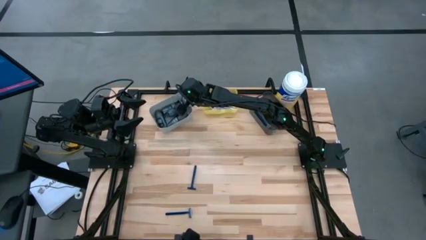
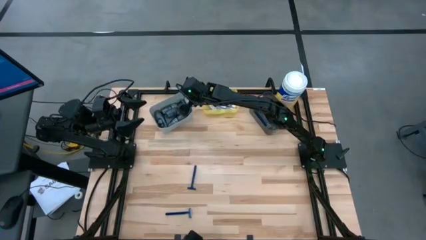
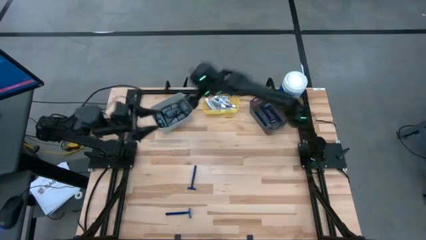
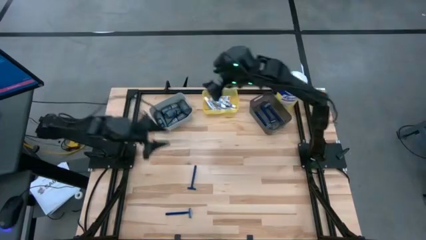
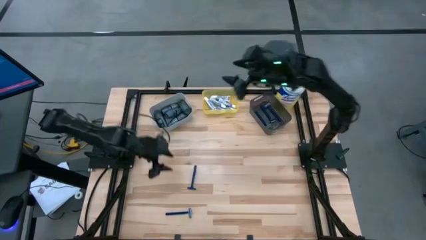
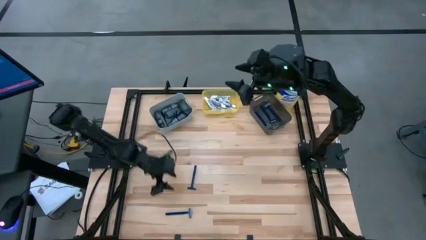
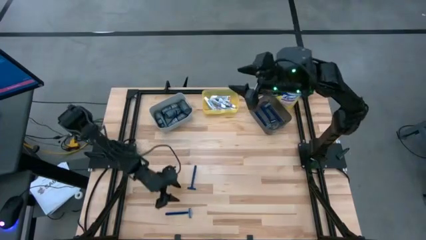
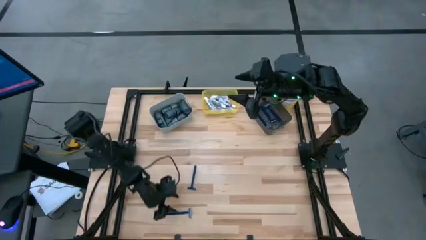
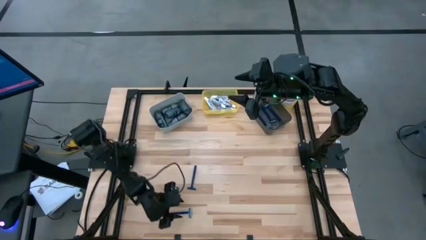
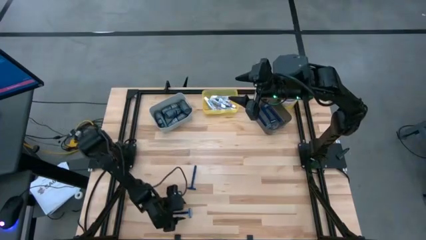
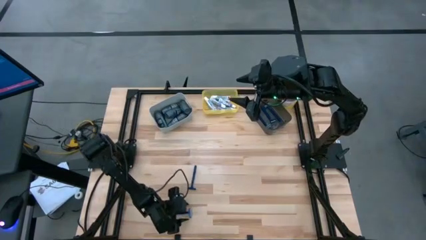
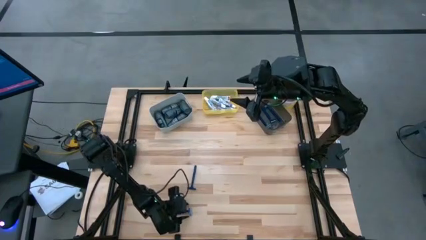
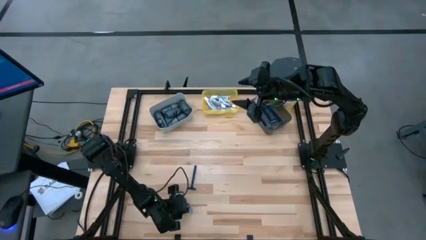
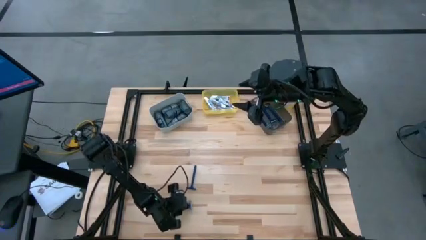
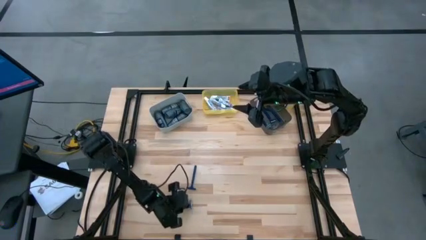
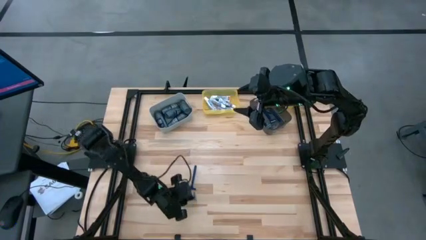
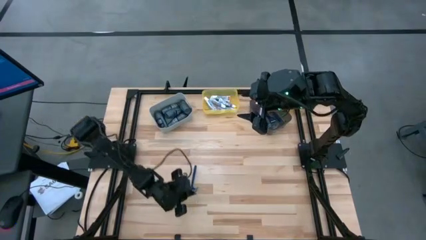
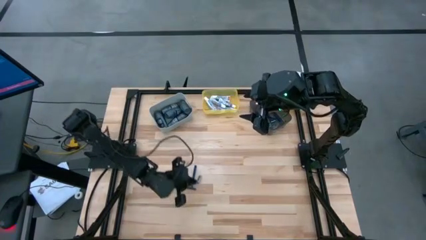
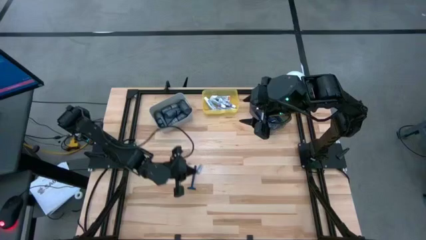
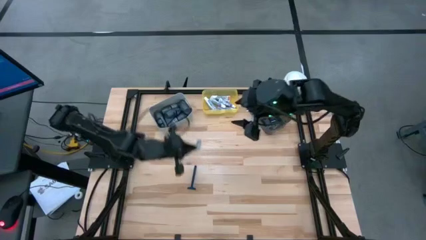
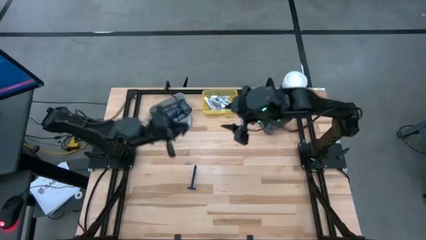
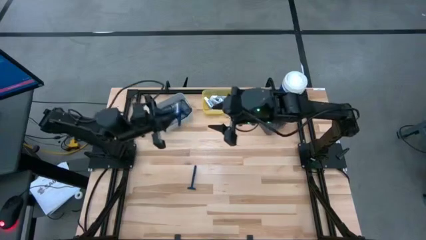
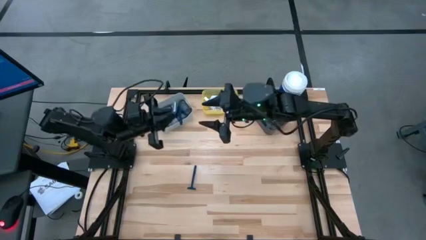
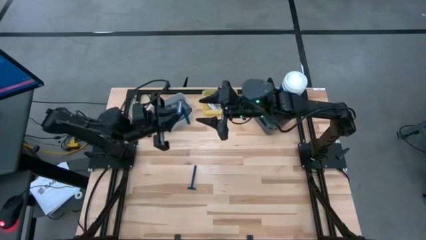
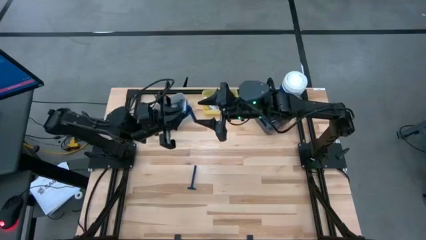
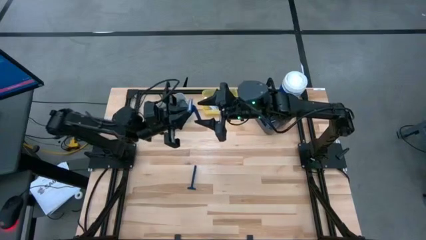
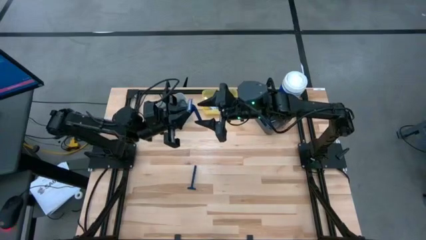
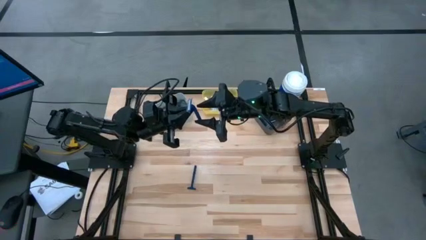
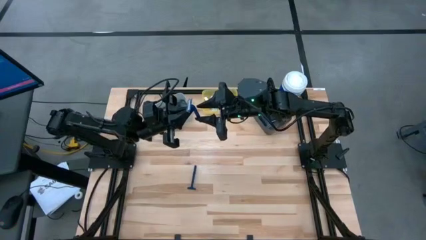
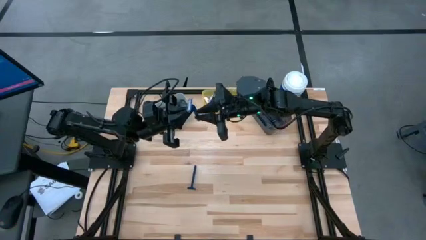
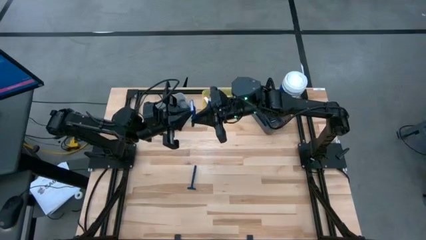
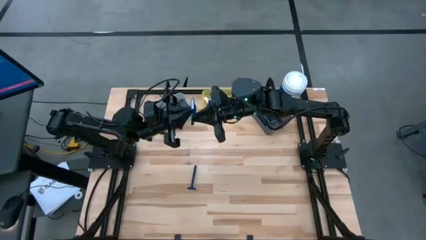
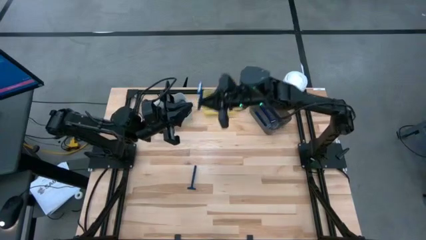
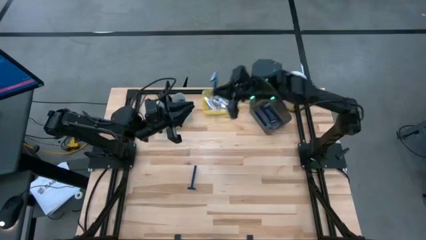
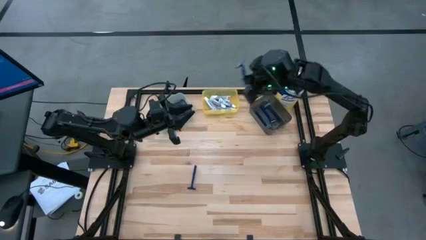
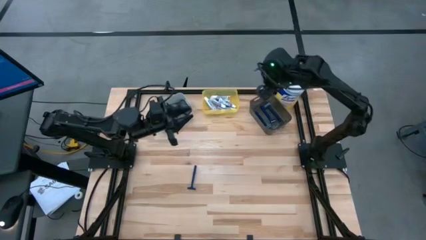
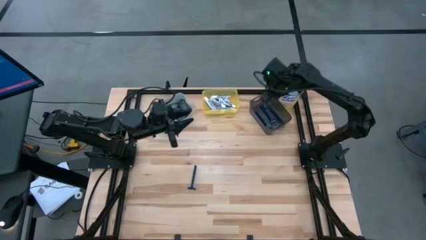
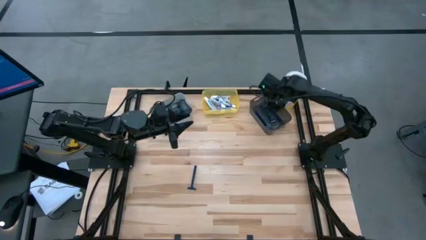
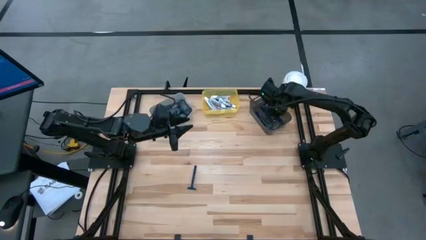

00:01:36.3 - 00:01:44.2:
Task: Pick & Place Travel size toiletries
Put the blue razor into the black bin

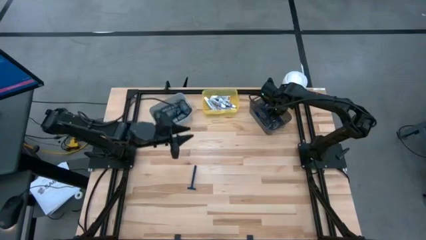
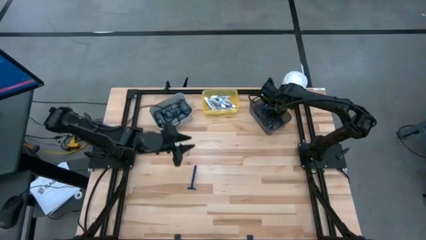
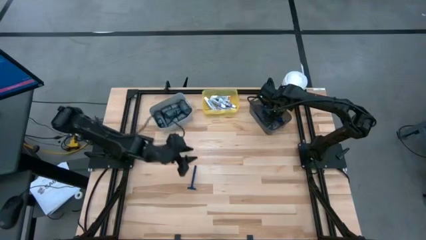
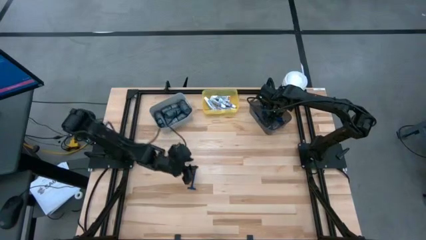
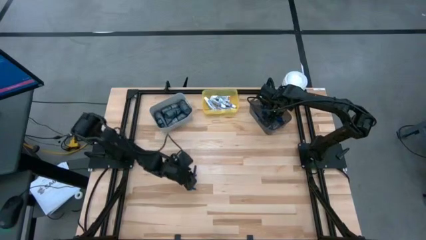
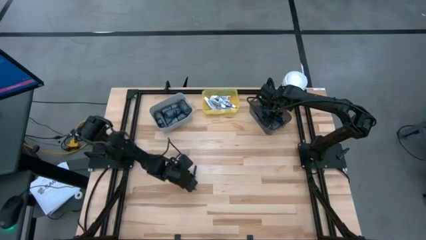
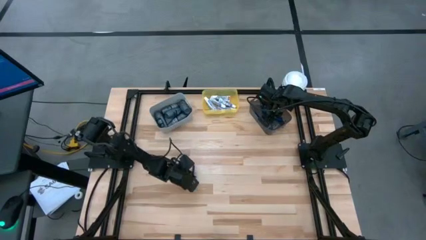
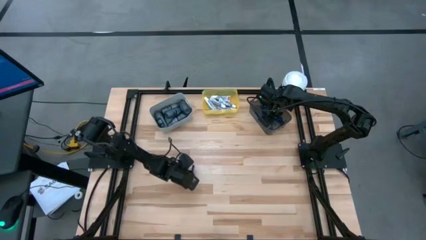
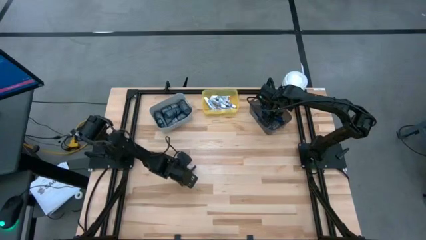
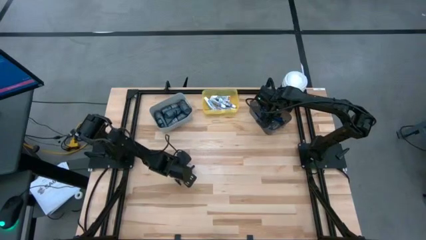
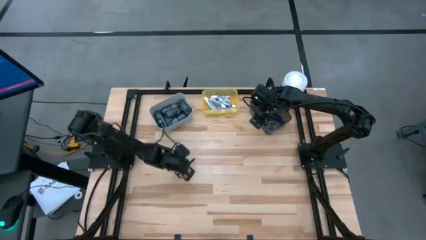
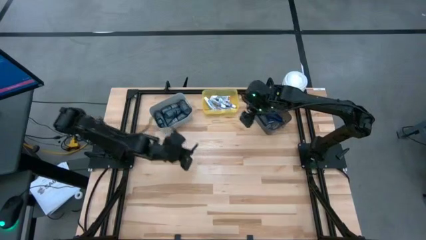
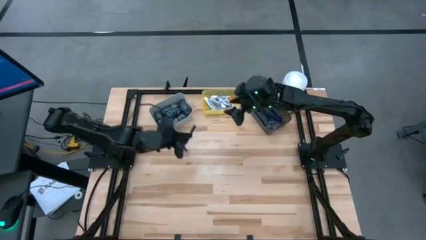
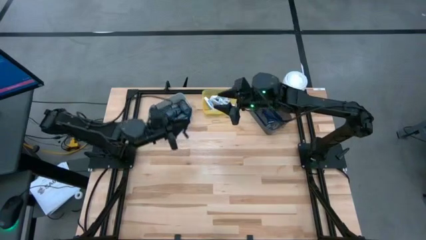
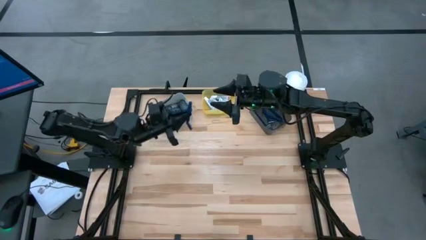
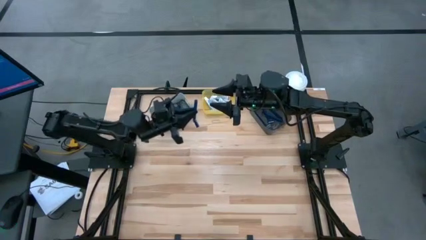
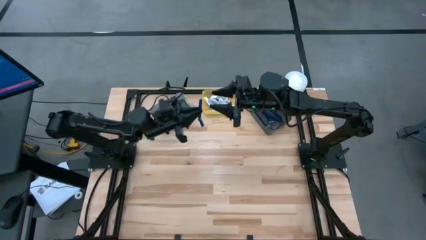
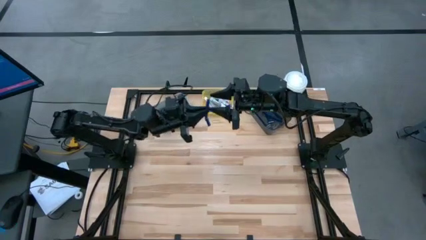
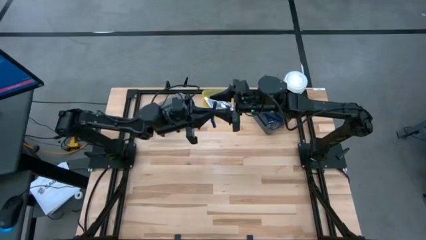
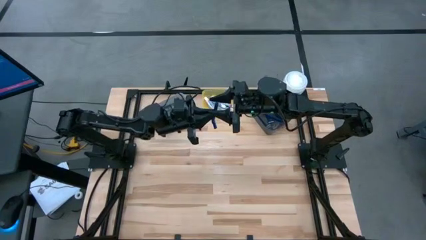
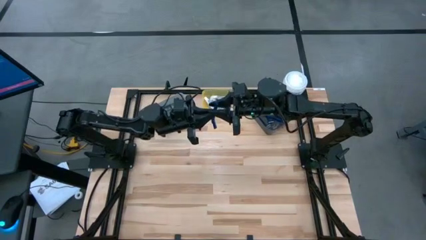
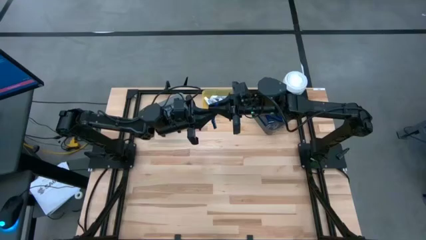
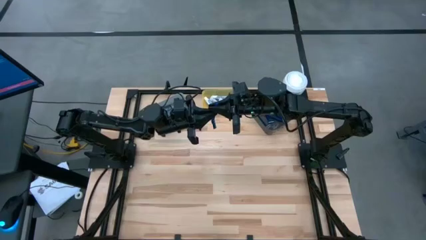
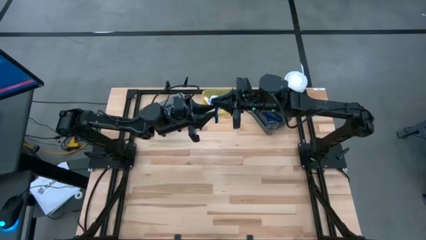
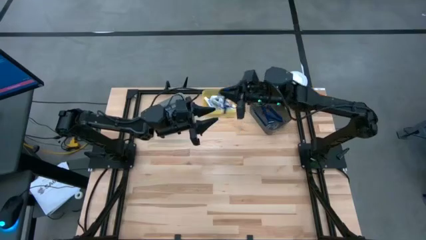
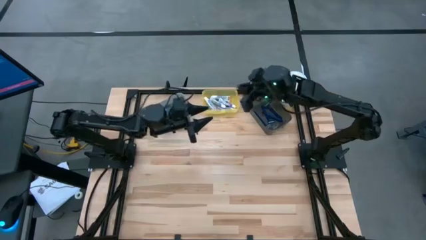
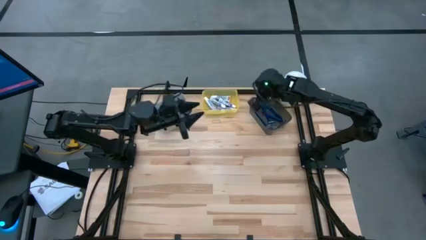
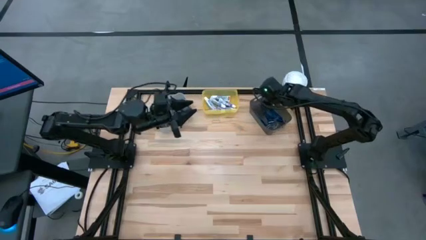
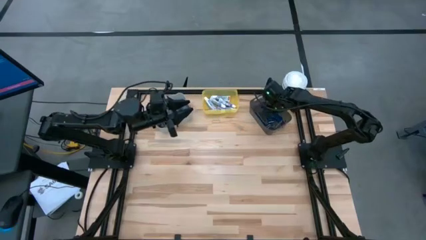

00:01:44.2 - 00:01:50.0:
Put the blue razor into the black bin

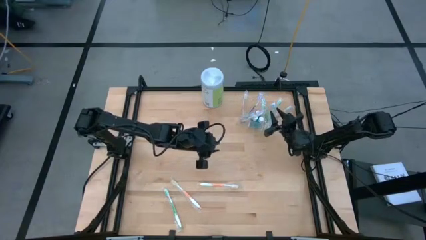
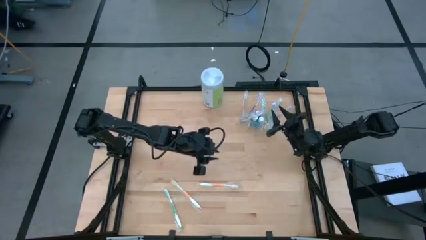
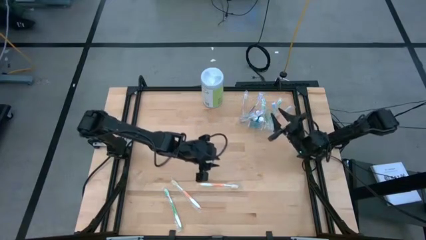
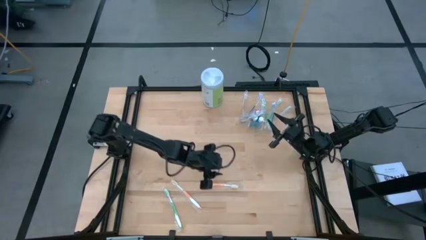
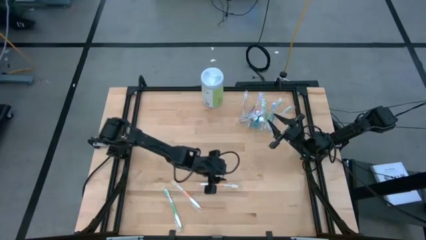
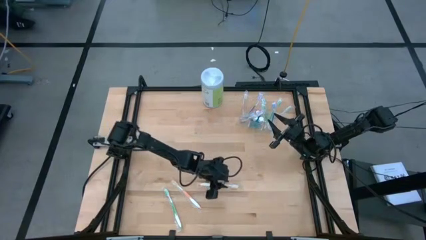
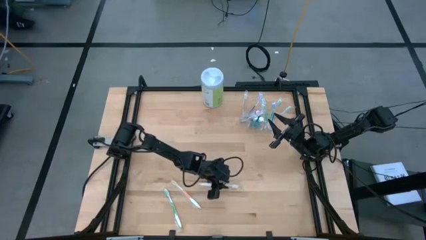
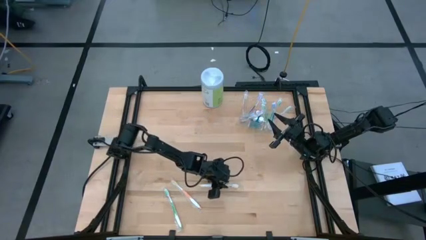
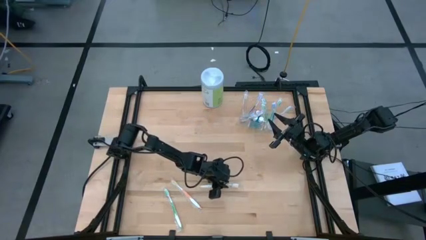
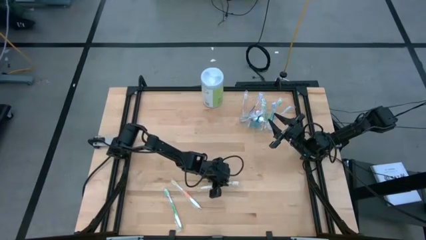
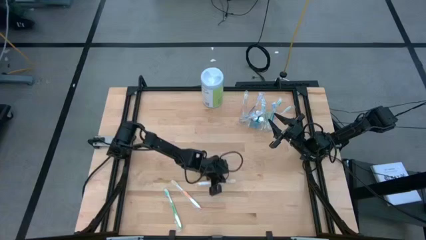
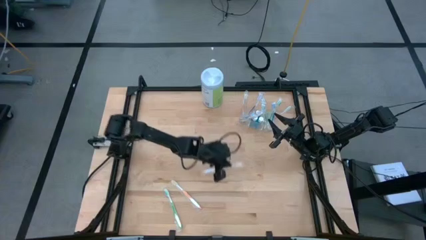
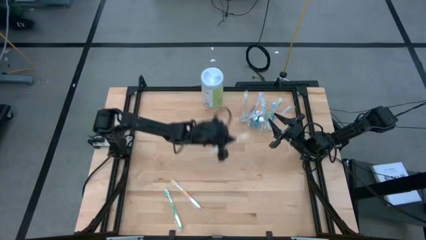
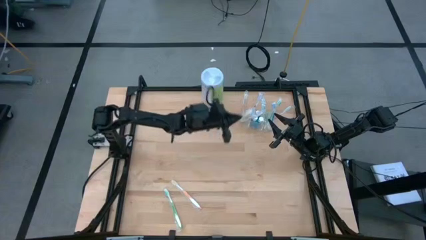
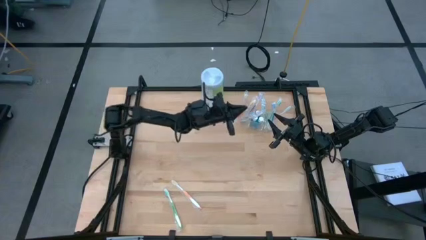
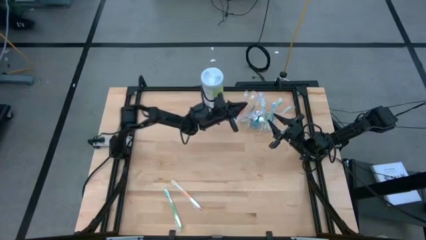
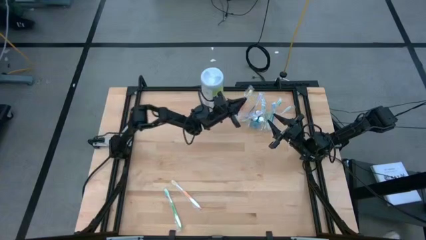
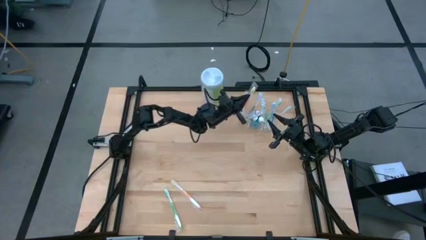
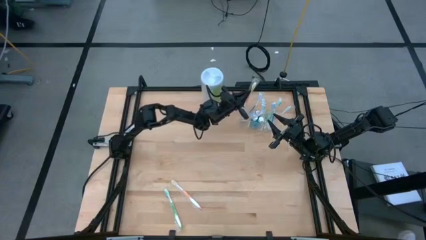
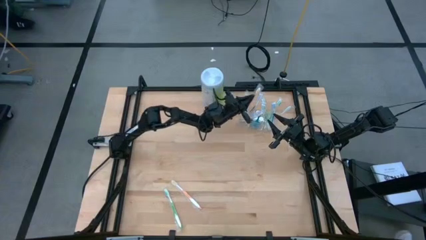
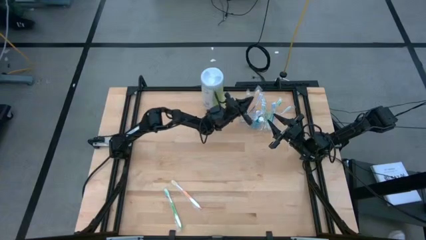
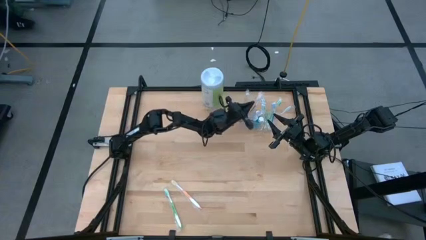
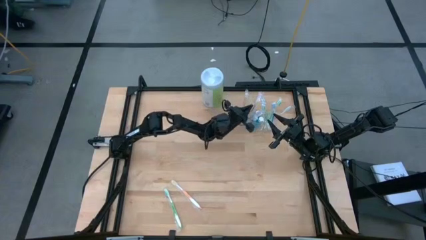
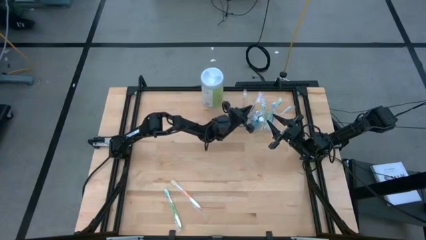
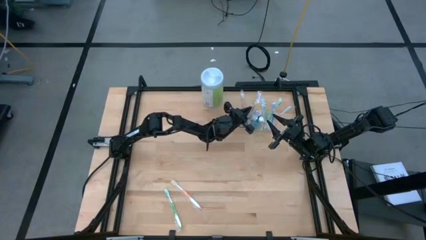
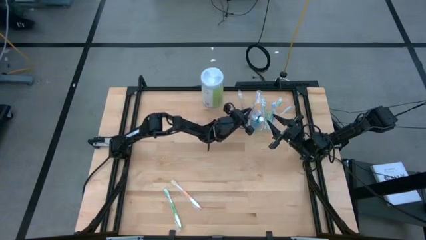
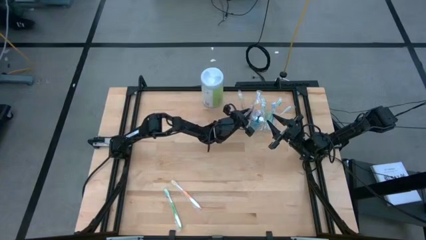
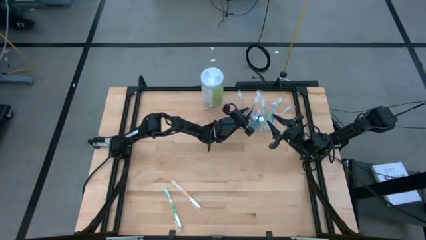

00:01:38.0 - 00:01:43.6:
Task: Pick & Place toothbrushing station
Put the orange toothbrush into the transparent organizer
